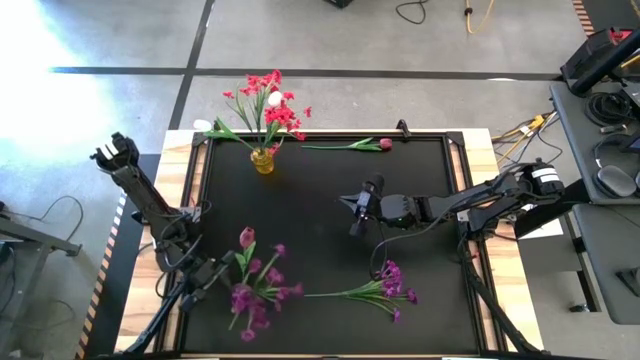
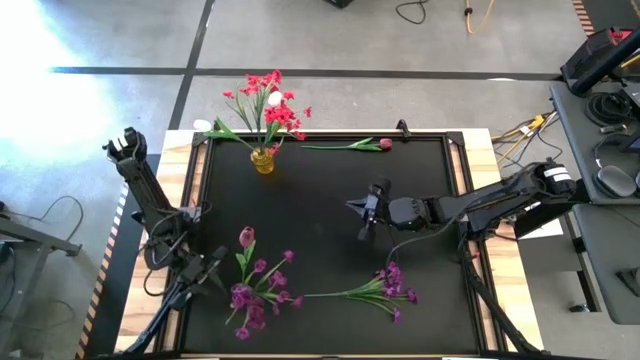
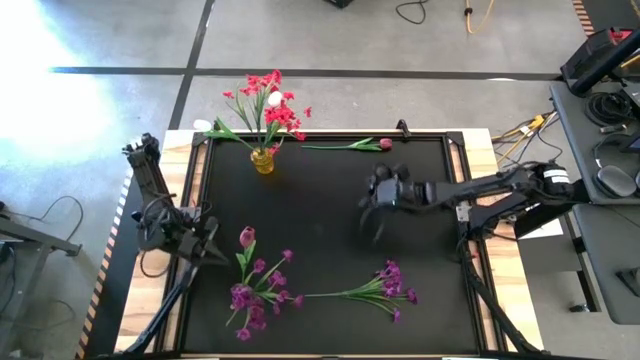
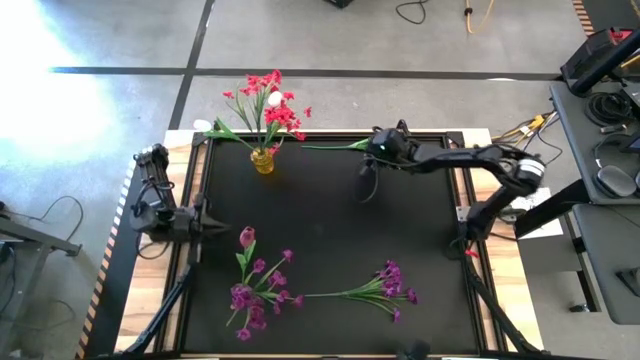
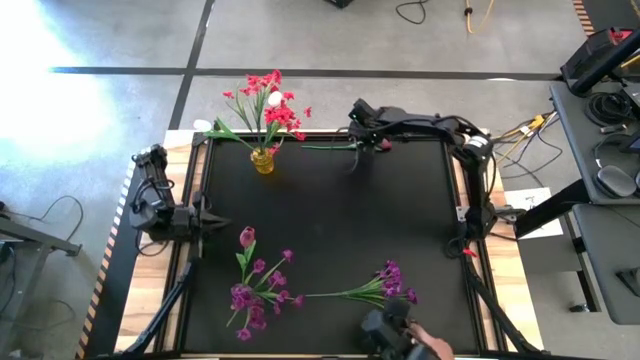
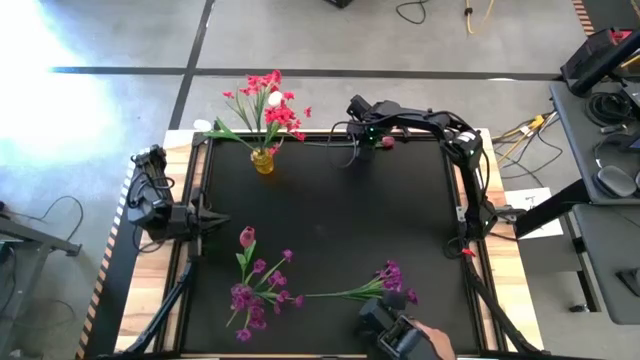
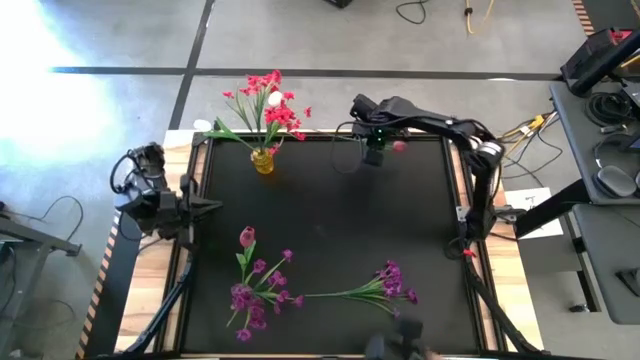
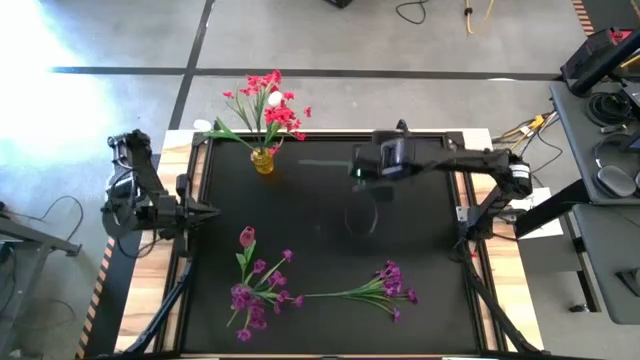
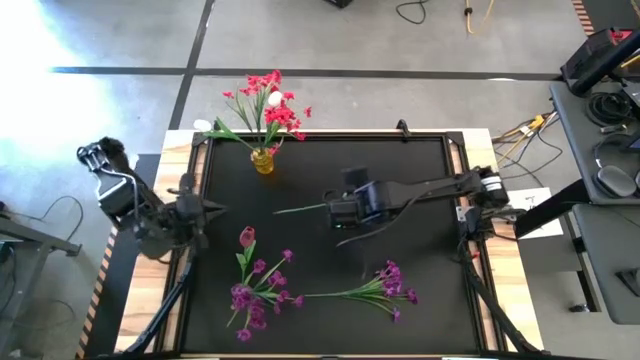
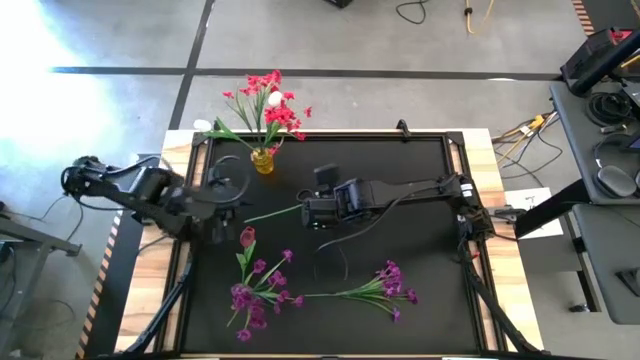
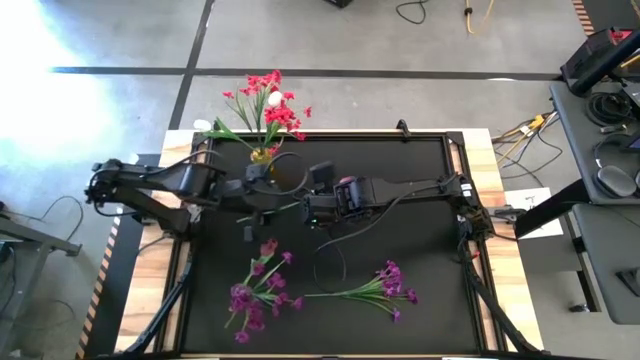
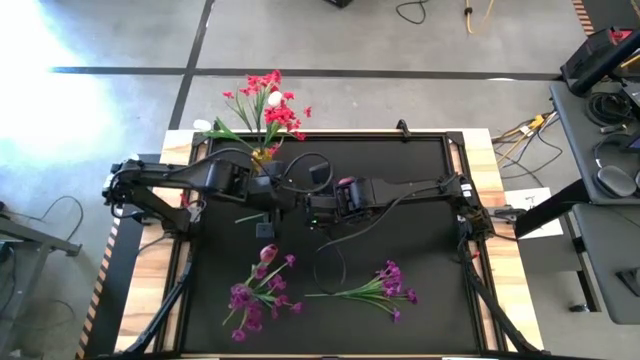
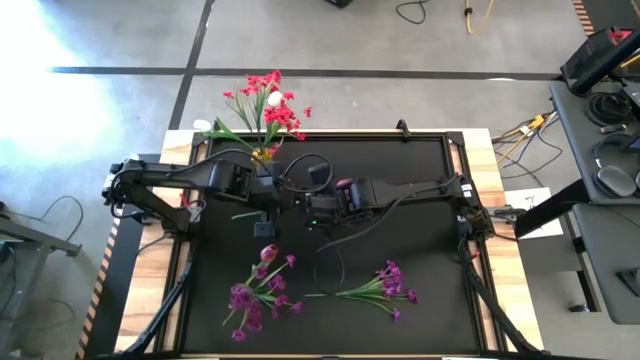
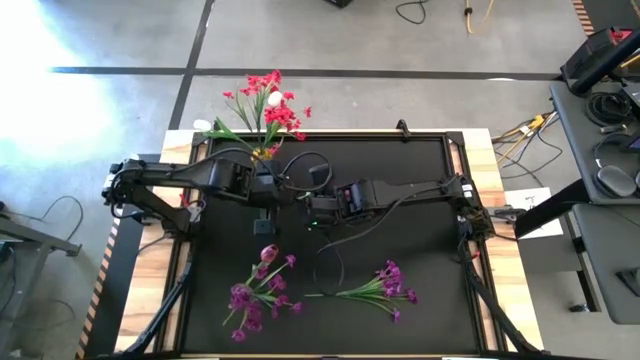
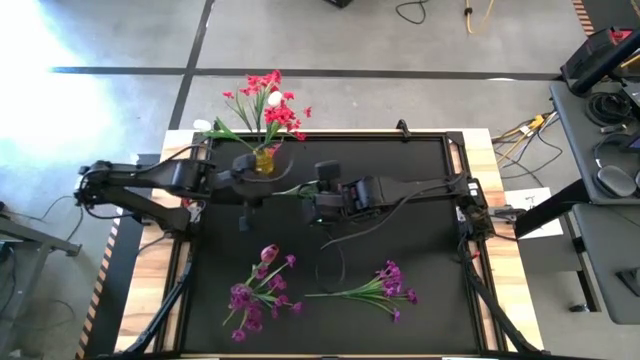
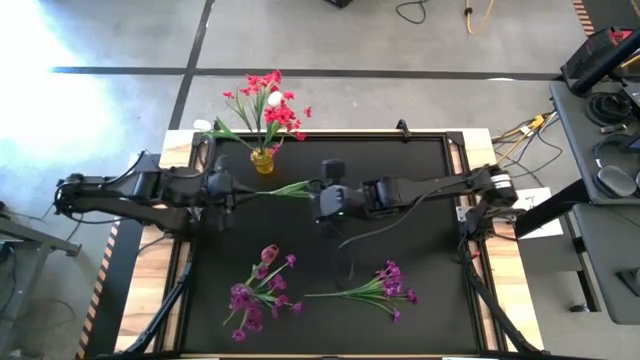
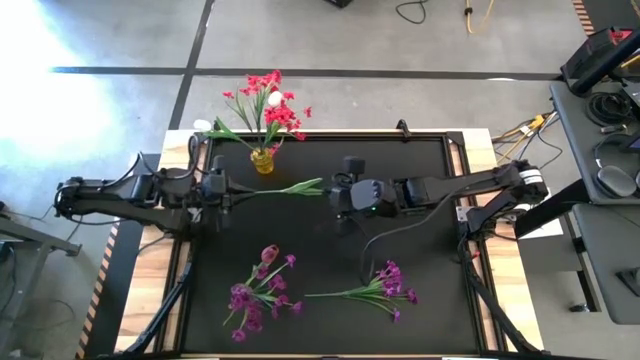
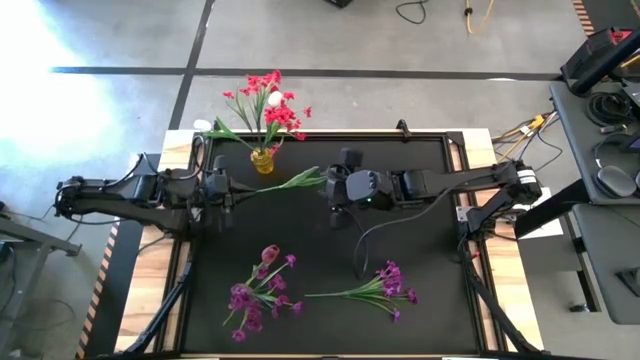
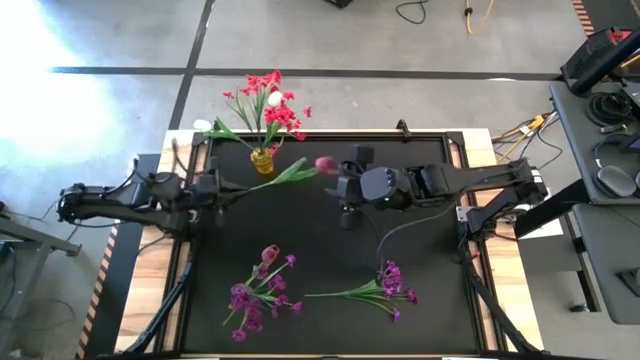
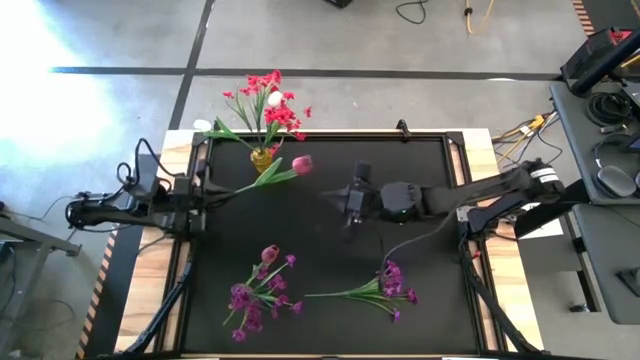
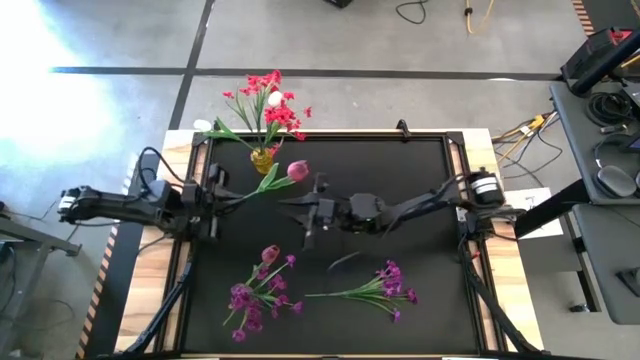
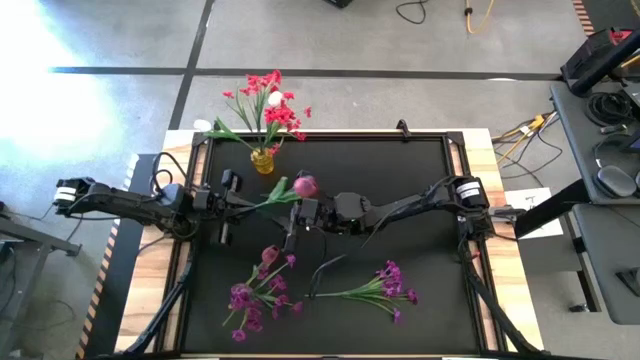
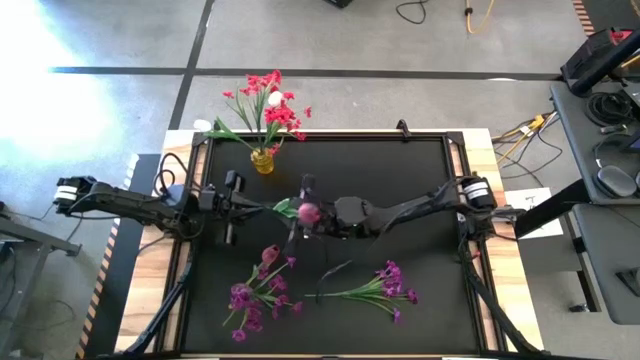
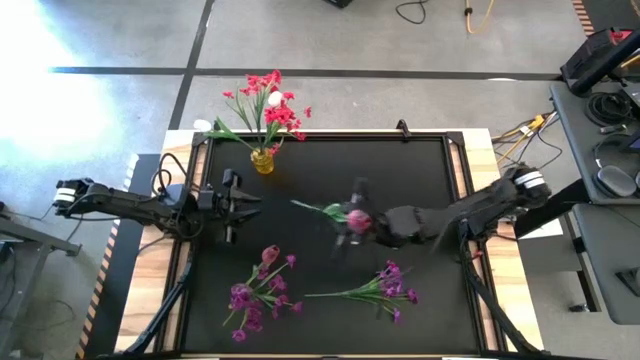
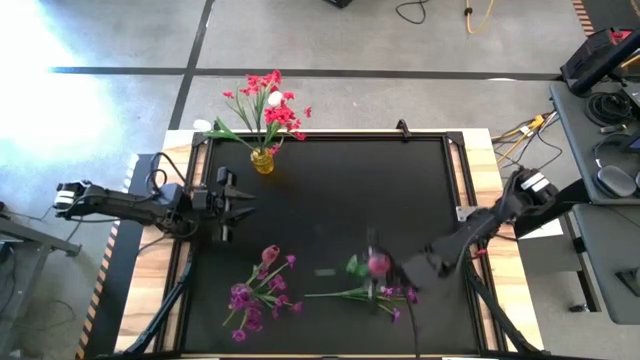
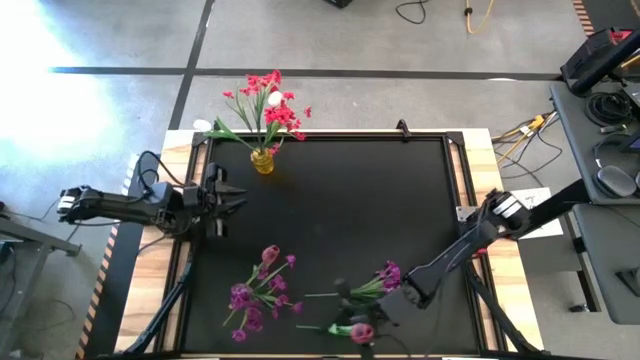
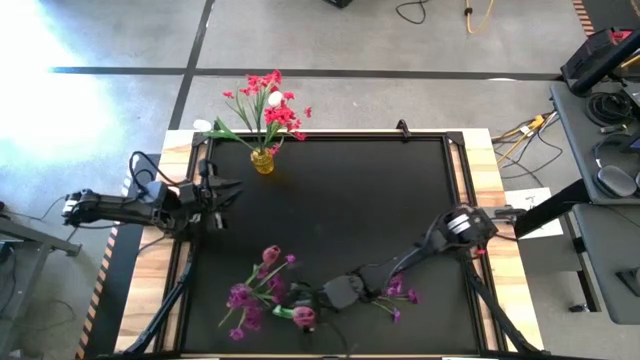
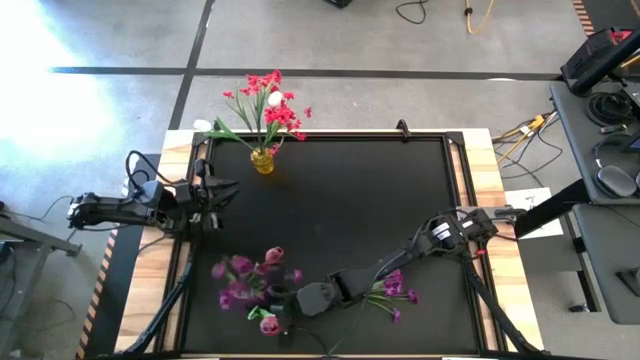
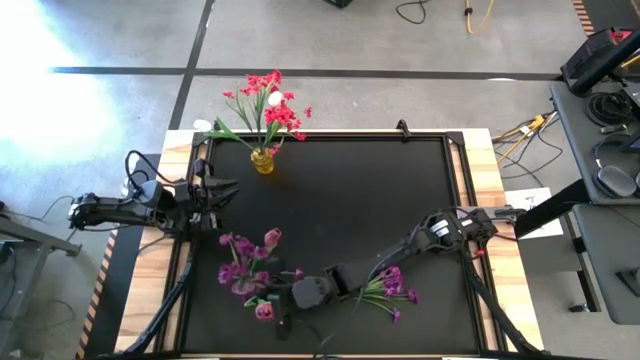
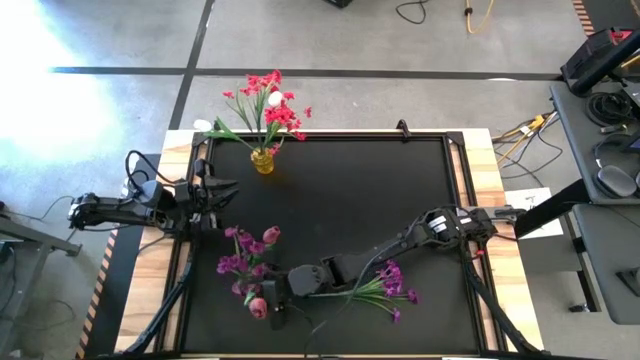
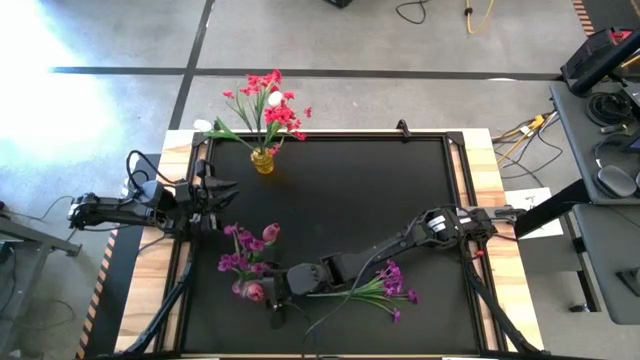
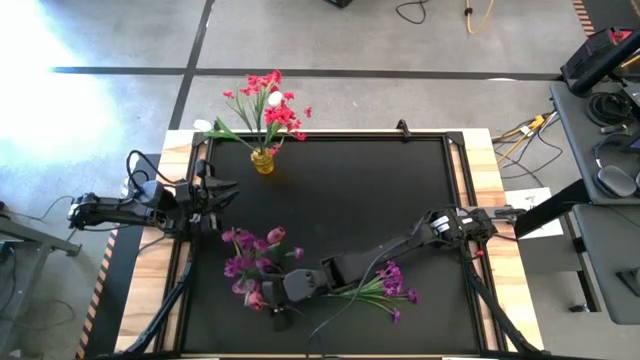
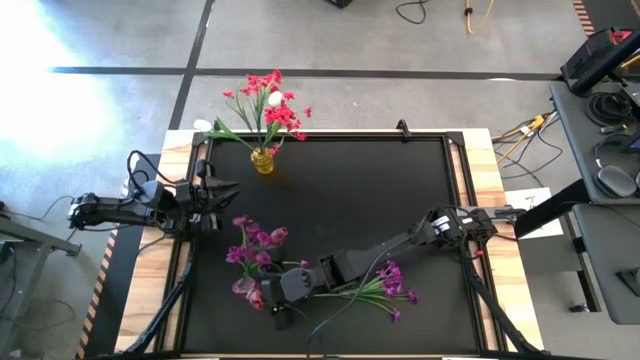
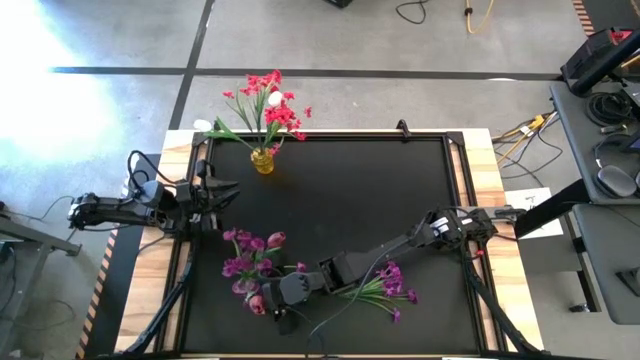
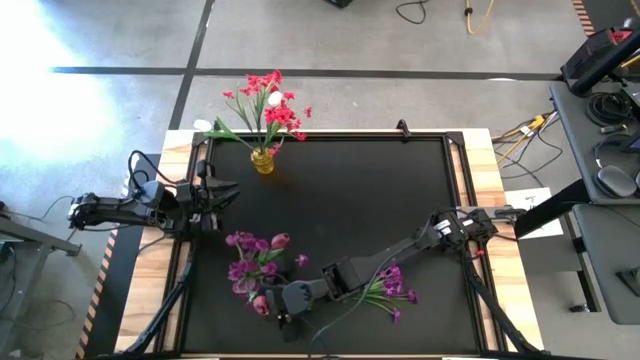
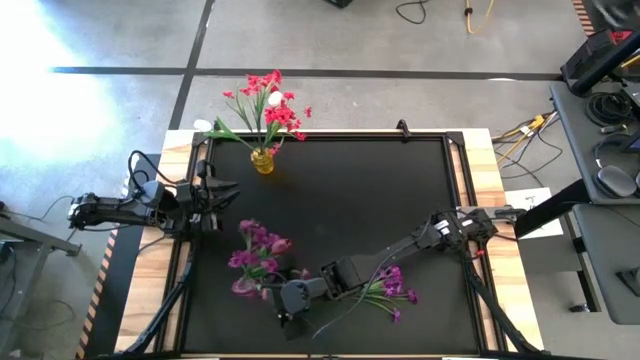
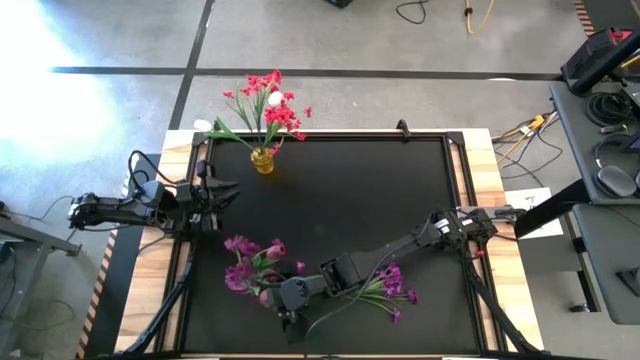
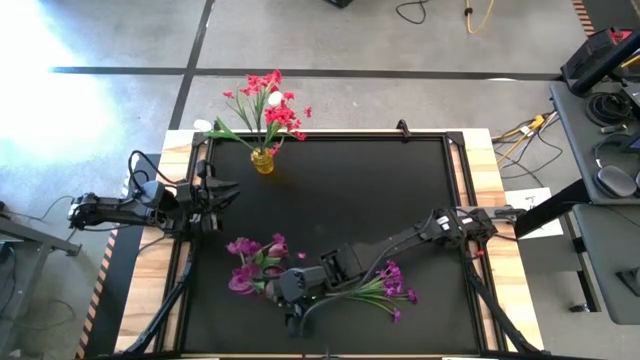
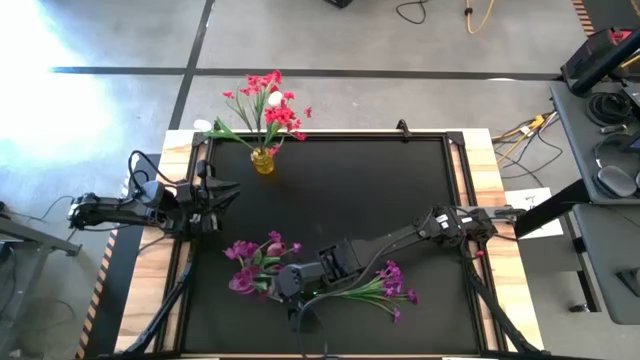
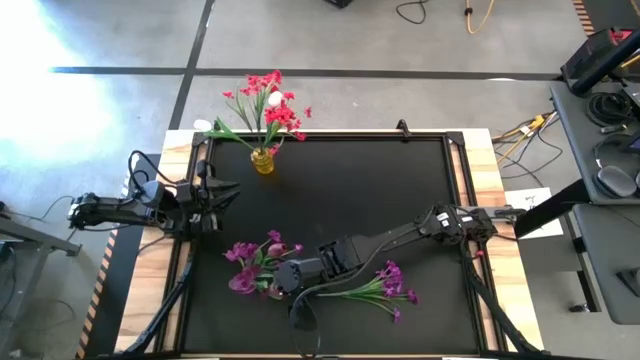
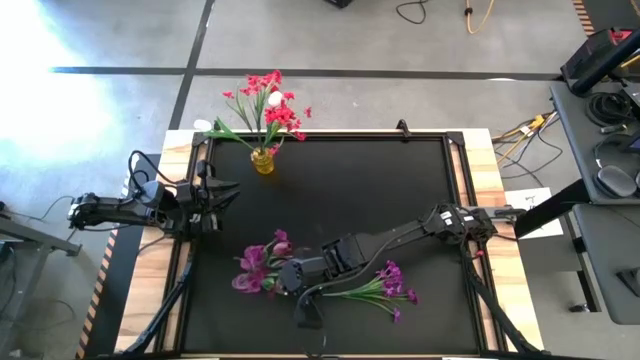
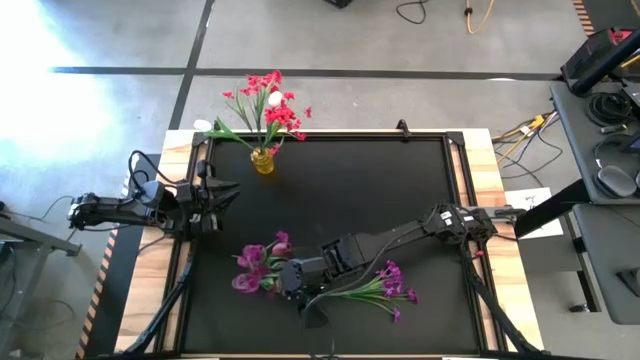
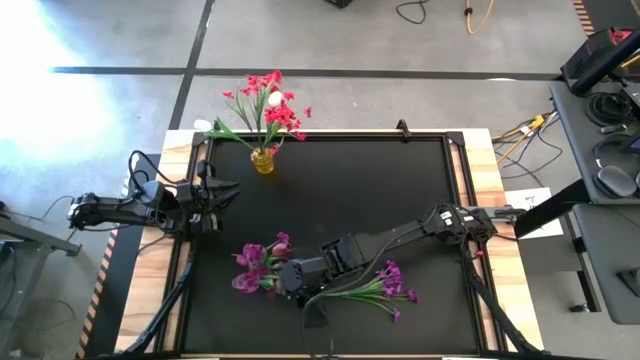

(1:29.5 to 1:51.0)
Task: Sort flowers into vase by color
Put the red tulip into the violet vase
